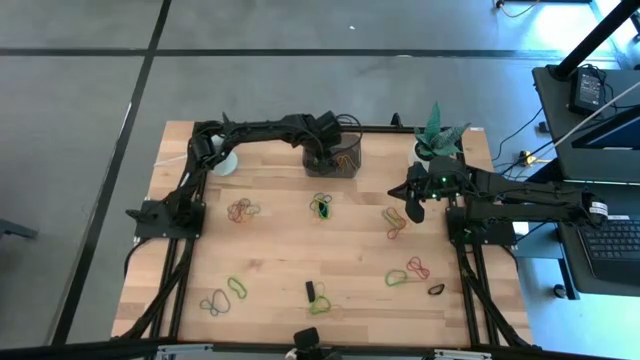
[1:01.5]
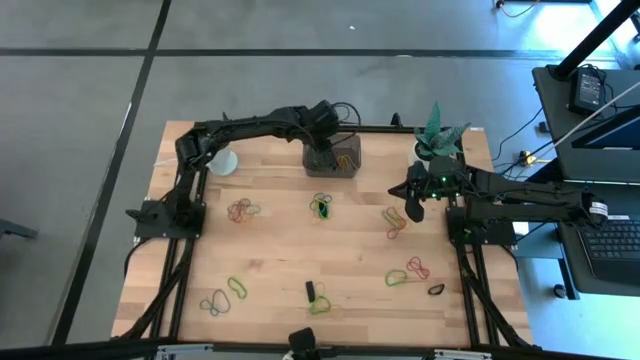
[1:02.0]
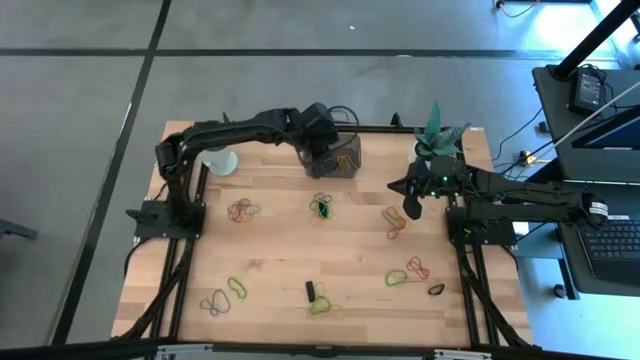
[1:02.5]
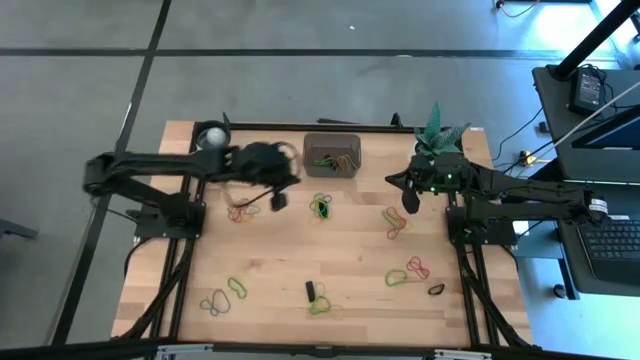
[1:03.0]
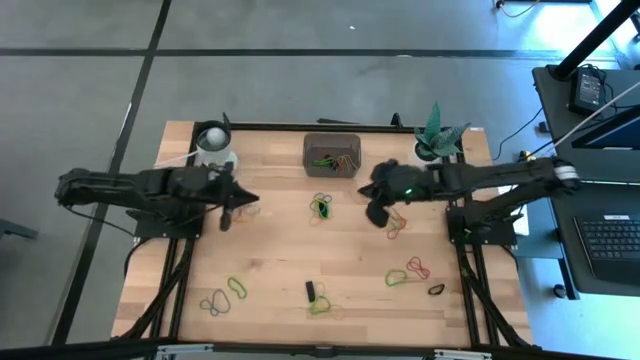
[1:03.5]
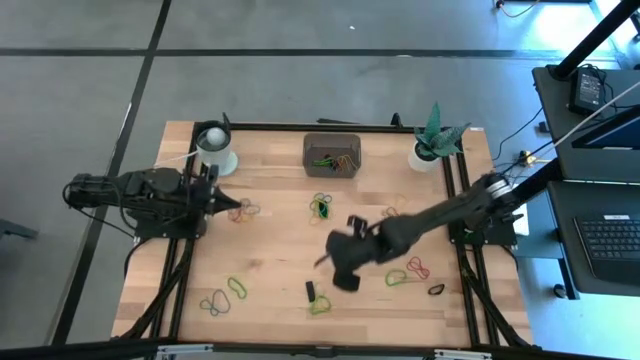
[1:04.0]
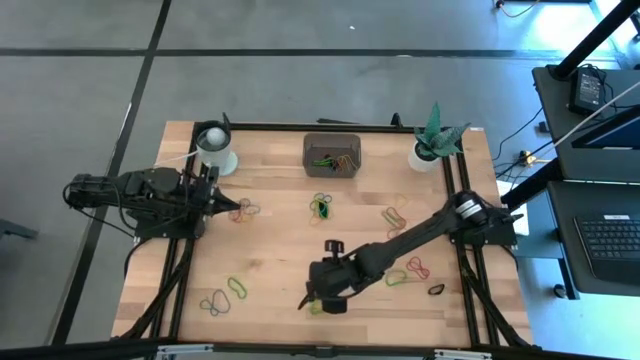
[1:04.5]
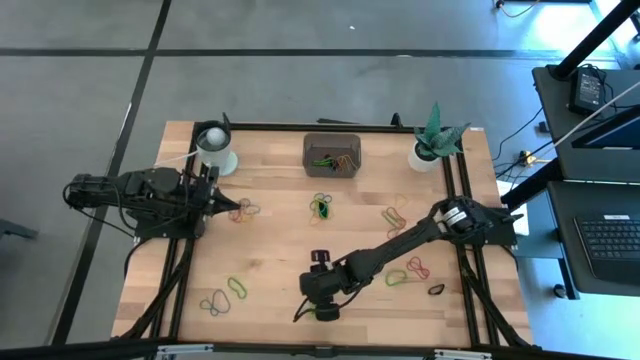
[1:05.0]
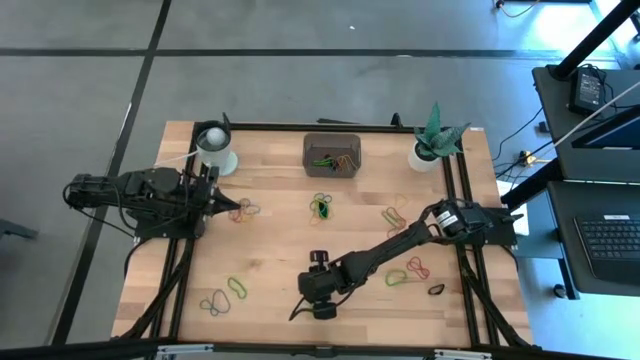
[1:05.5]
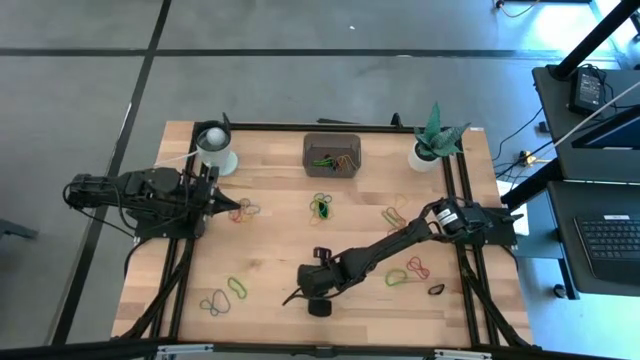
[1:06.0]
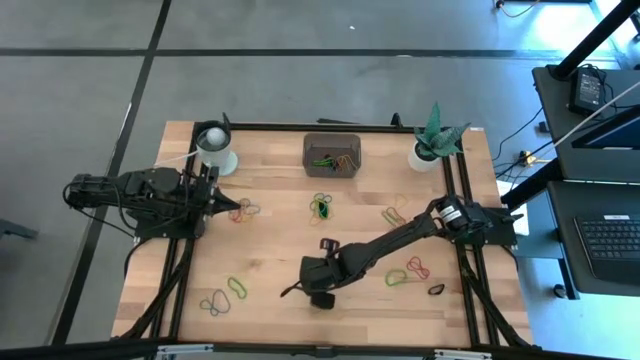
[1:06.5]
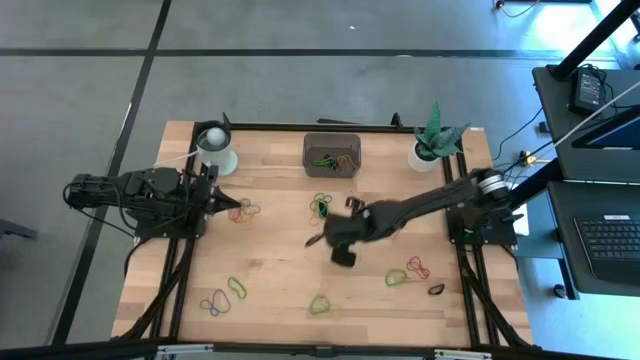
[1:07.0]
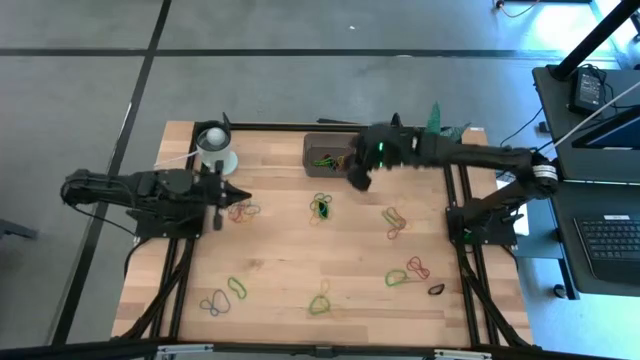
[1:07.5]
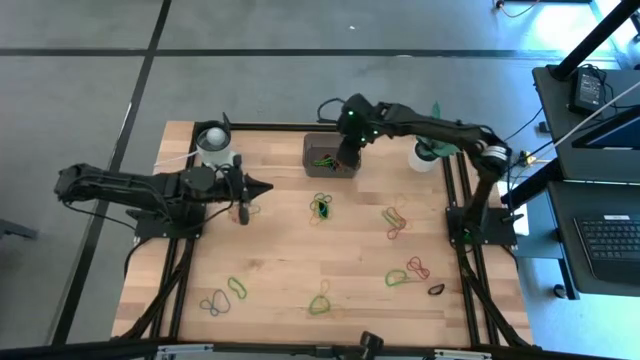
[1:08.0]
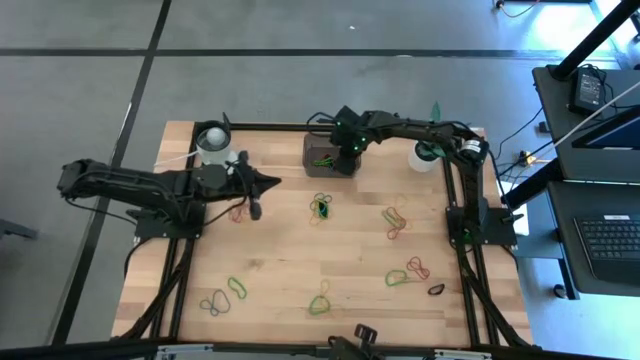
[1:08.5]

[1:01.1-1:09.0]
Task: Pick and place rubber bands into bin
Put the black rubber band into the bin

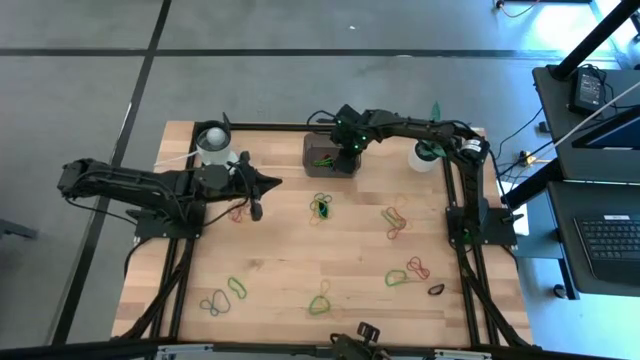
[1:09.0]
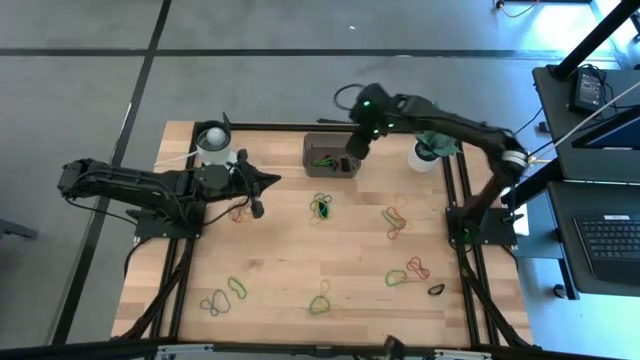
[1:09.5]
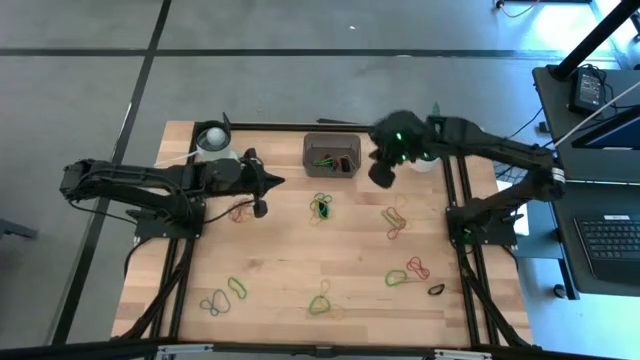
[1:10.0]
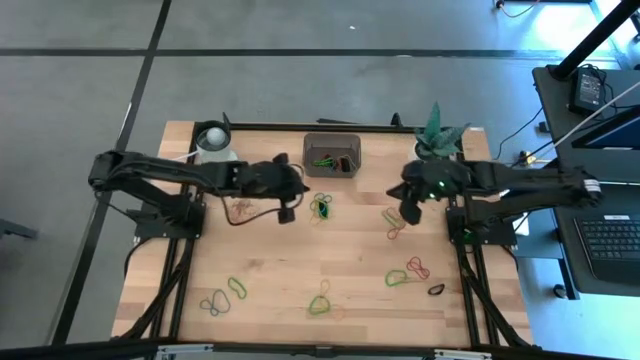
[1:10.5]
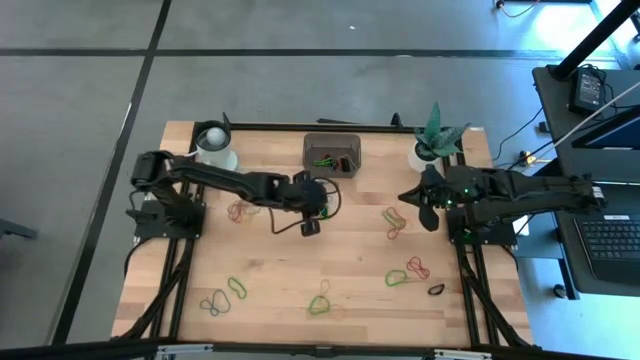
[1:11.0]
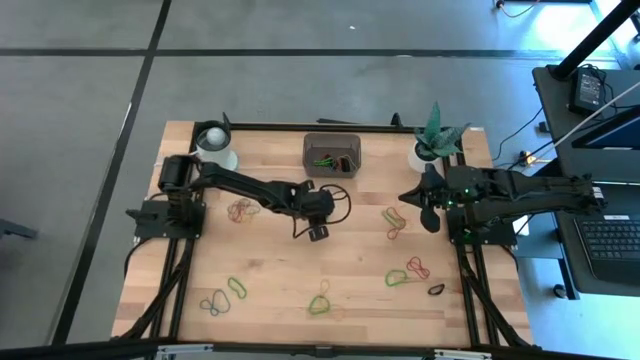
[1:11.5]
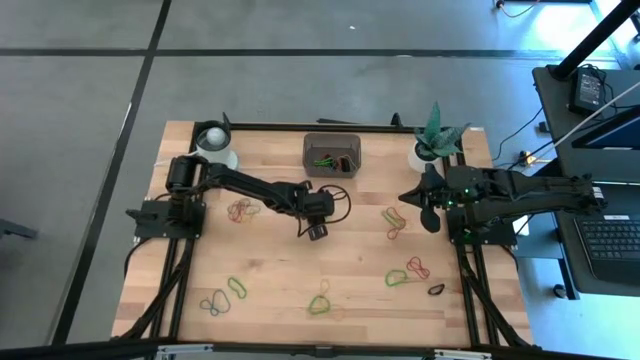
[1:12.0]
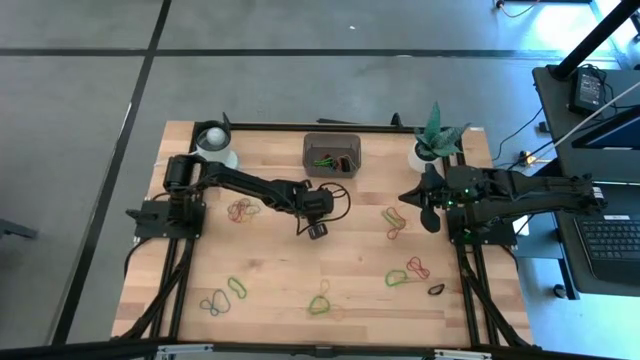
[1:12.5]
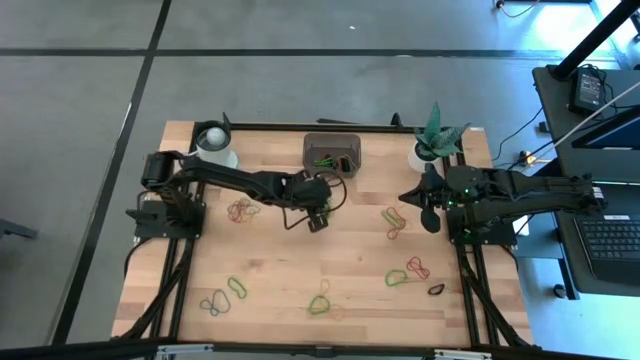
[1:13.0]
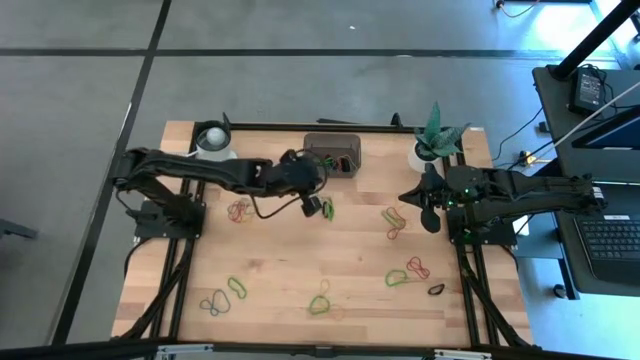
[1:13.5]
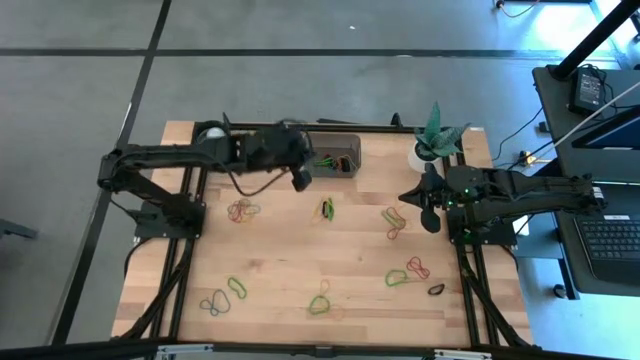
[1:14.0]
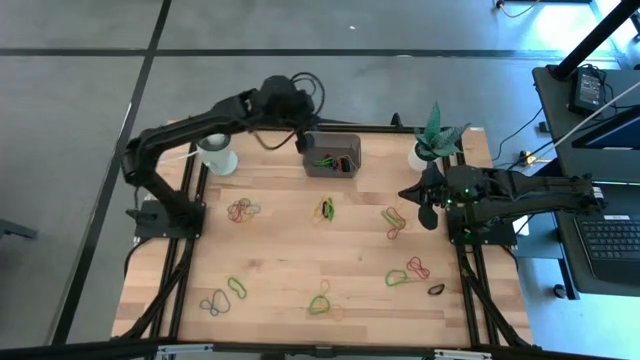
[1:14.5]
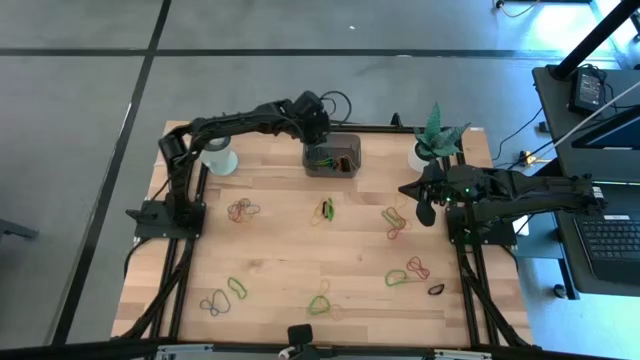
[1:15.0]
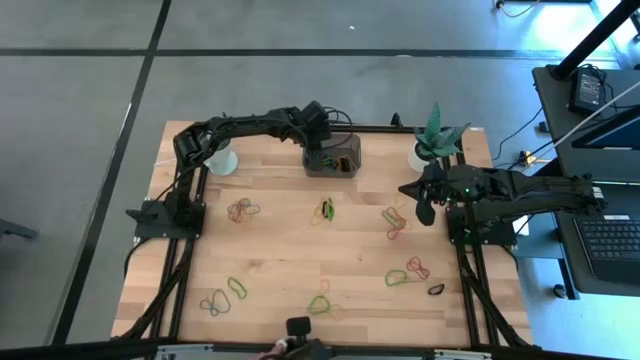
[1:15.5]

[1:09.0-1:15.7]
Put the blue rubber band into the bin

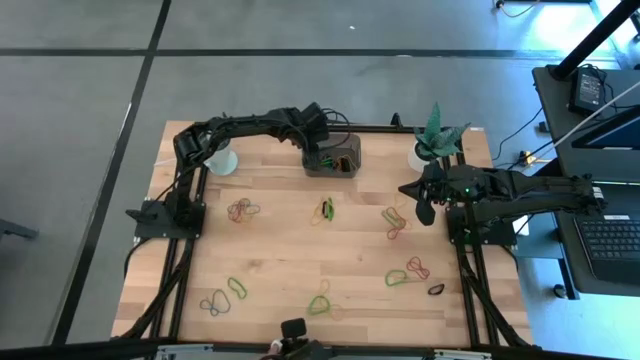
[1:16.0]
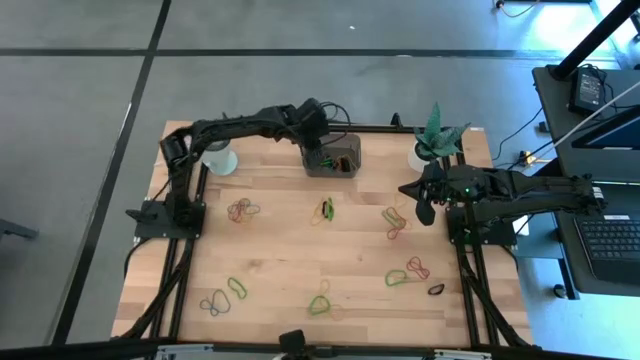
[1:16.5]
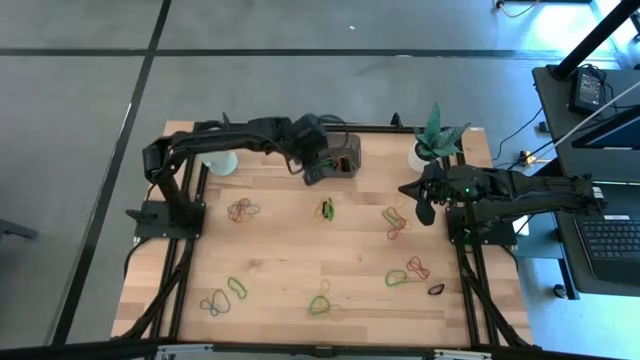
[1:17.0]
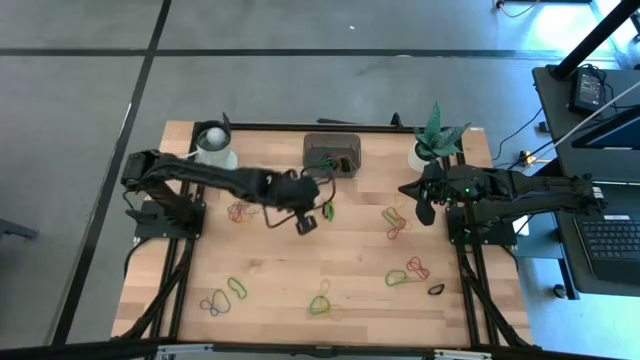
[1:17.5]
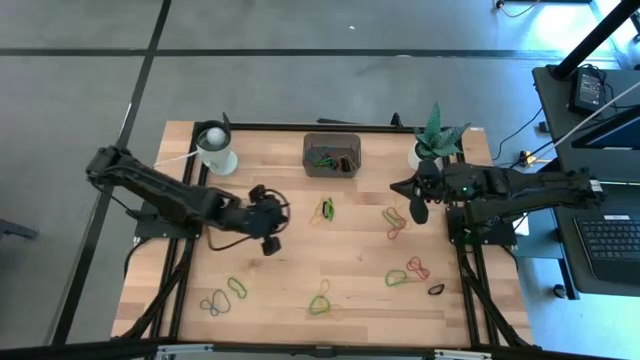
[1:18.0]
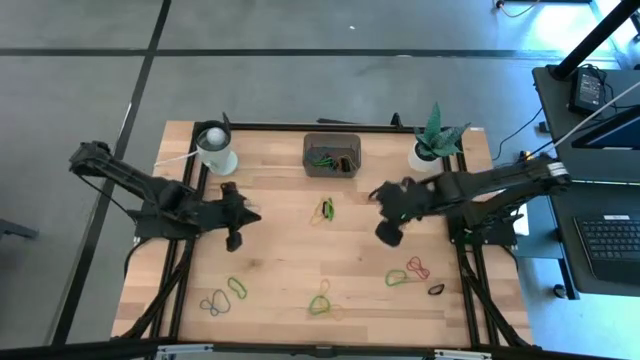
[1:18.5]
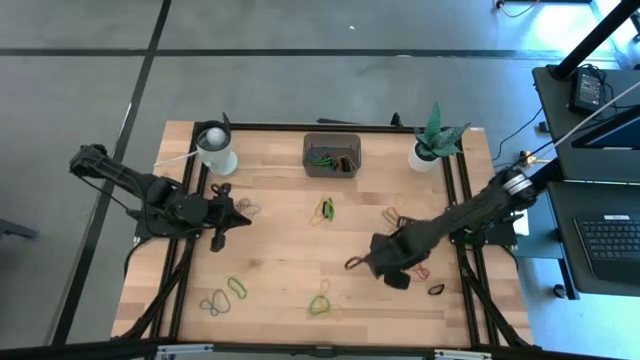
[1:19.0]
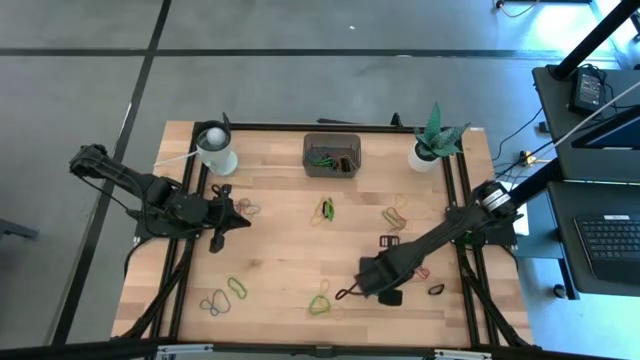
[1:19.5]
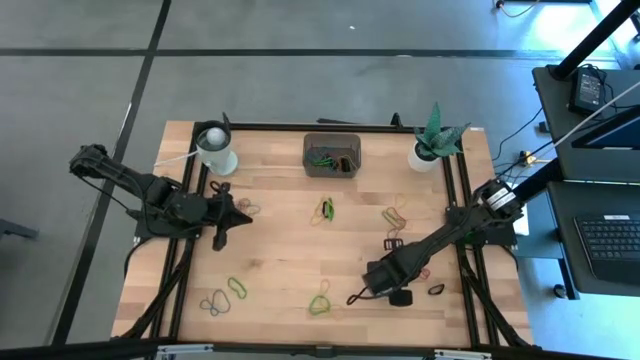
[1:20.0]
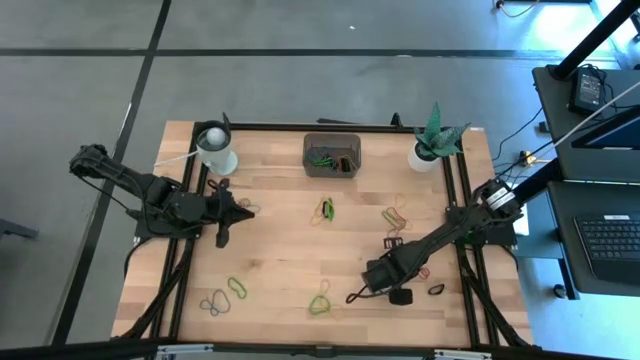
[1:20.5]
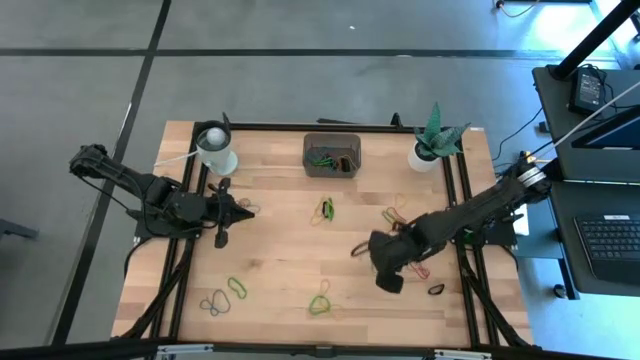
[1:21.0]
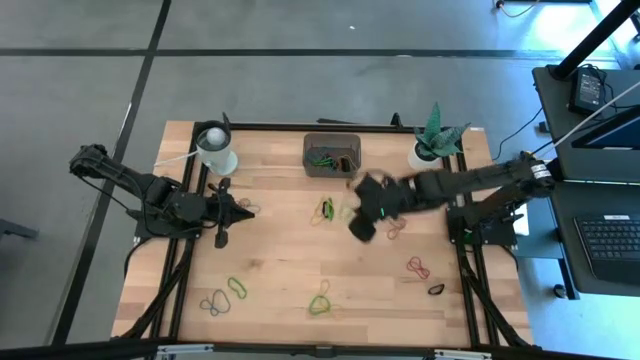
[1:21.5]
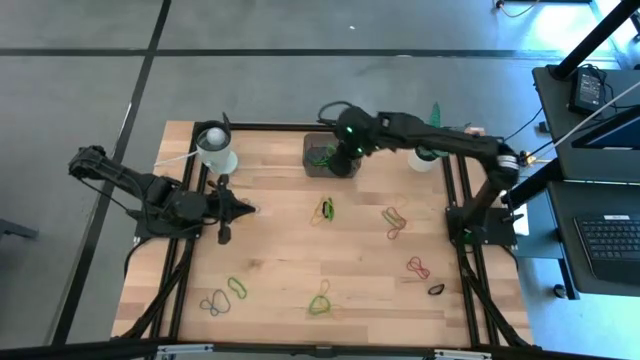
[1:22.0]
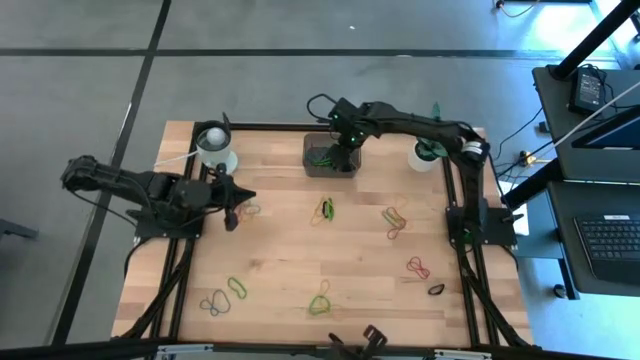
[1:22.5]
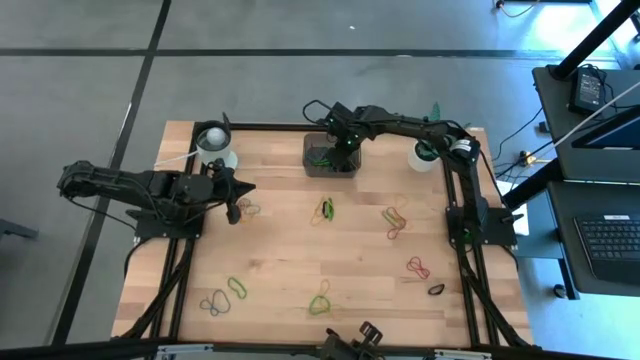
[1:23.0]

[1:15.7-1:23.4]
Put the green rubber band into the bin
